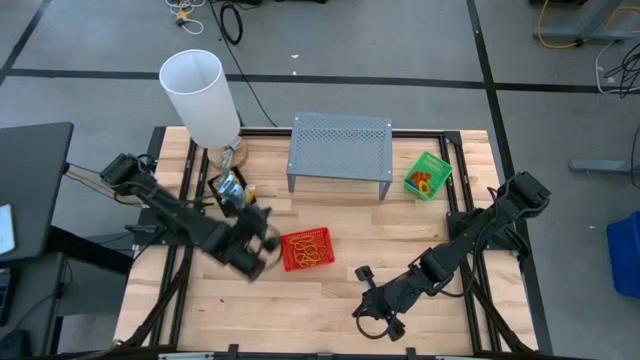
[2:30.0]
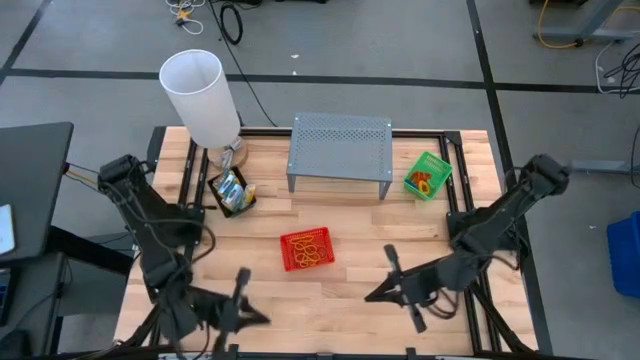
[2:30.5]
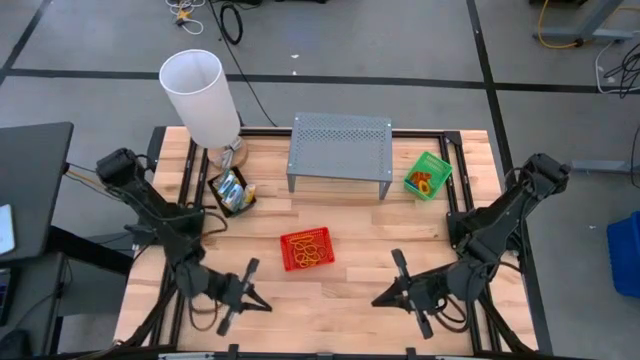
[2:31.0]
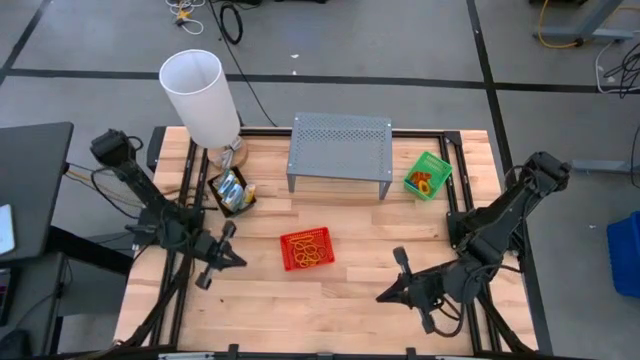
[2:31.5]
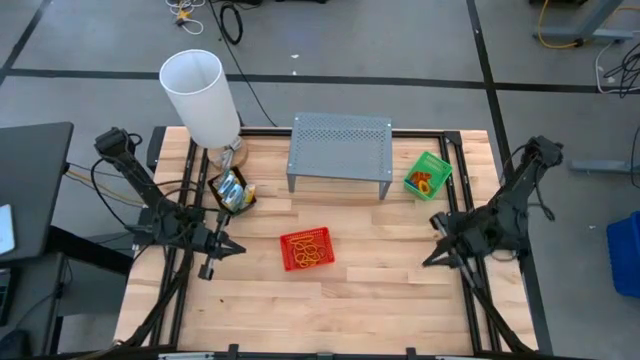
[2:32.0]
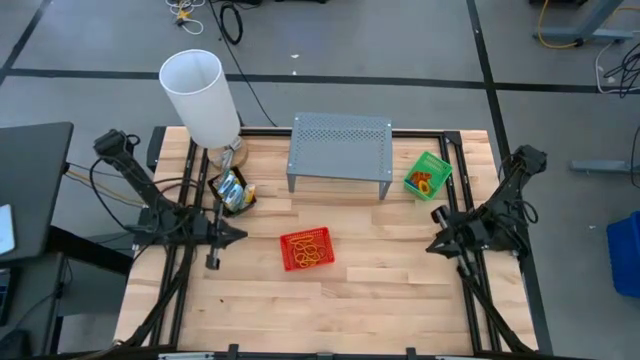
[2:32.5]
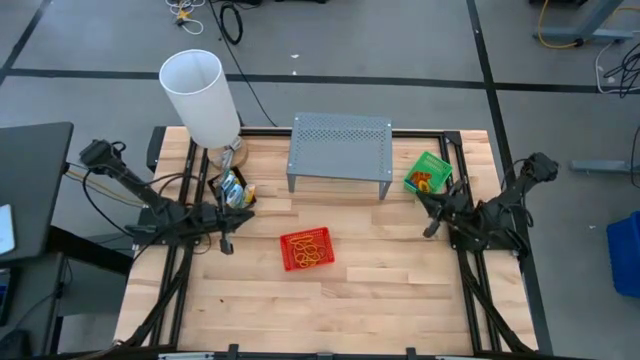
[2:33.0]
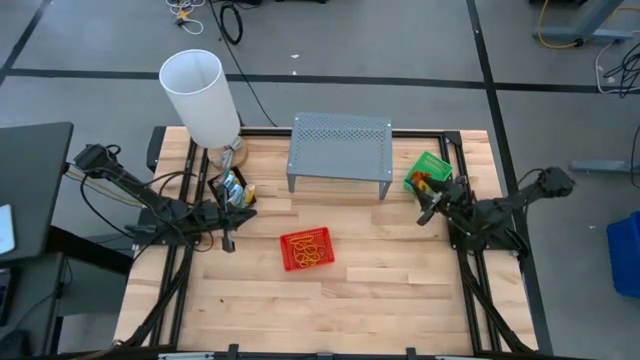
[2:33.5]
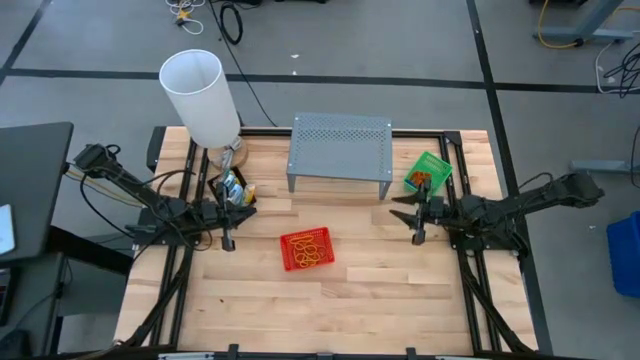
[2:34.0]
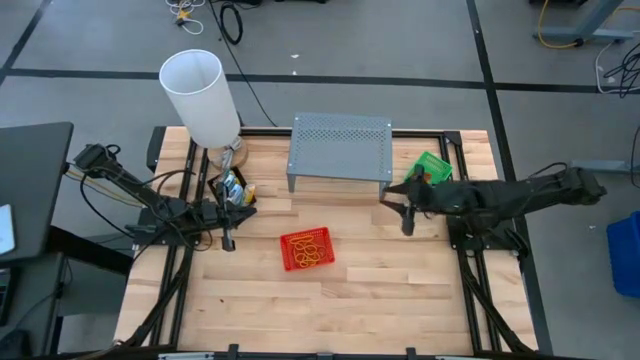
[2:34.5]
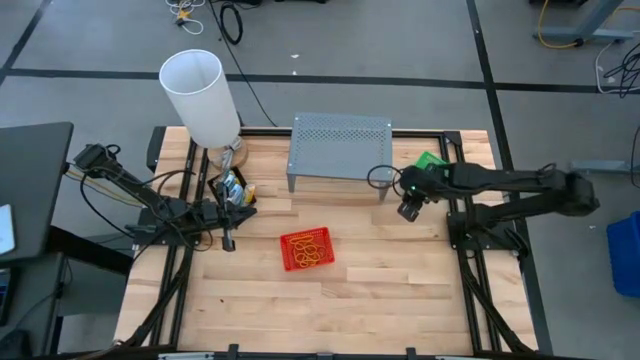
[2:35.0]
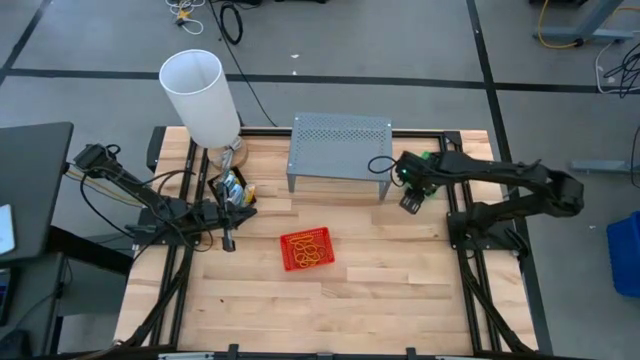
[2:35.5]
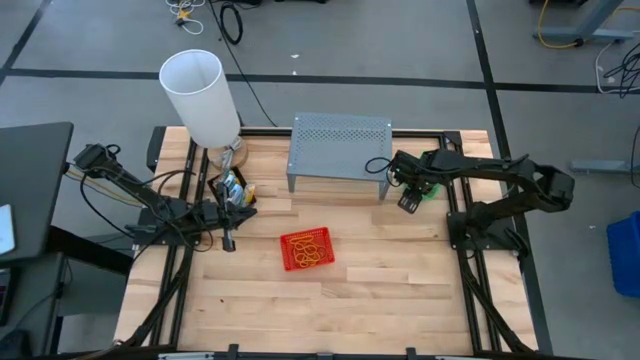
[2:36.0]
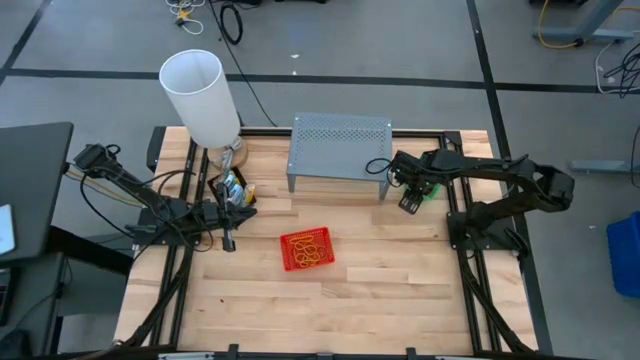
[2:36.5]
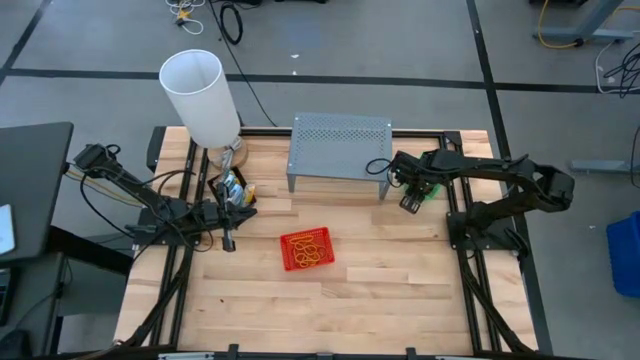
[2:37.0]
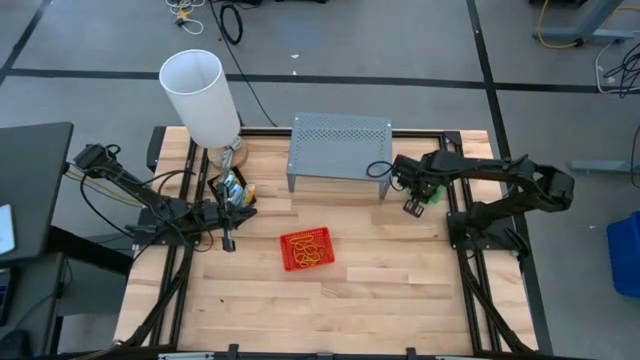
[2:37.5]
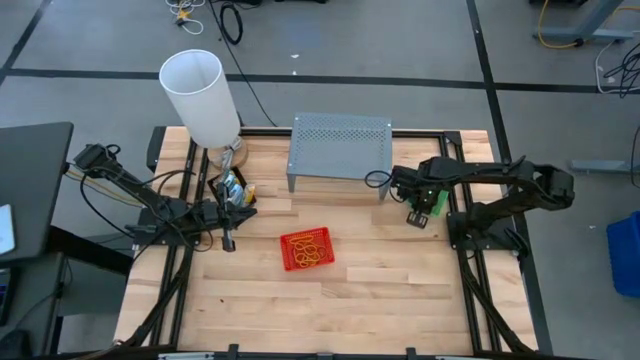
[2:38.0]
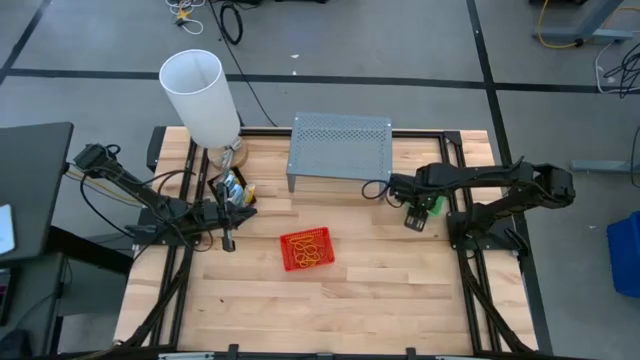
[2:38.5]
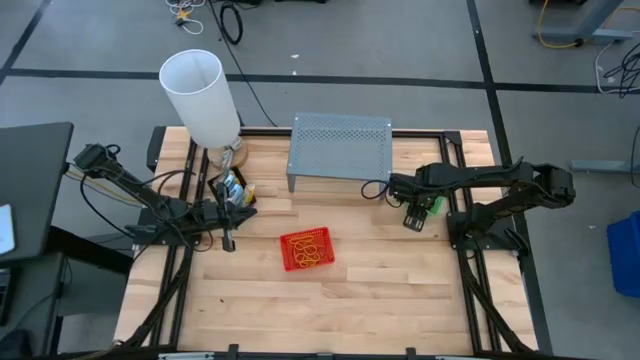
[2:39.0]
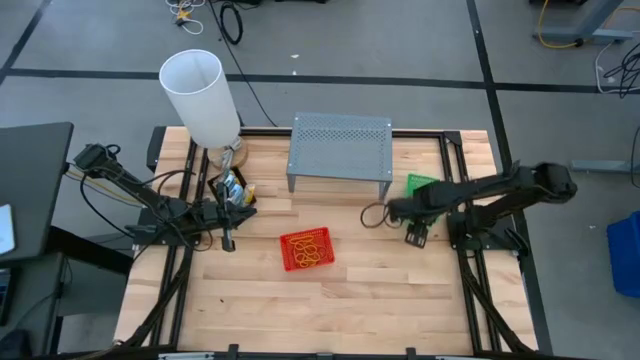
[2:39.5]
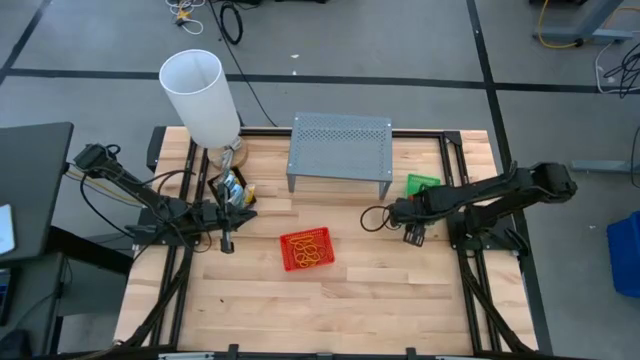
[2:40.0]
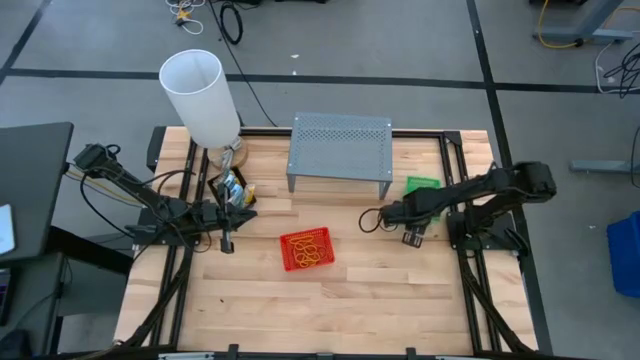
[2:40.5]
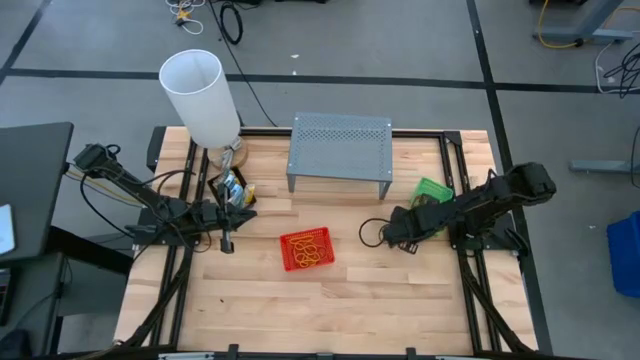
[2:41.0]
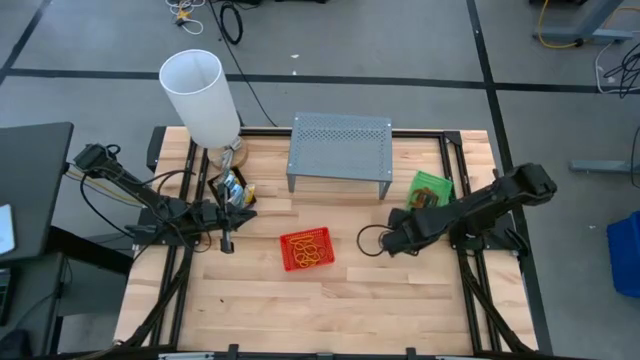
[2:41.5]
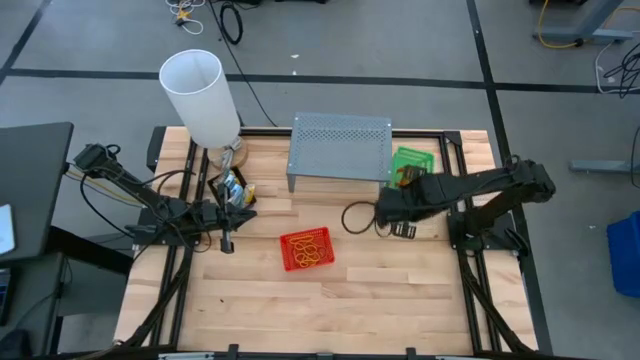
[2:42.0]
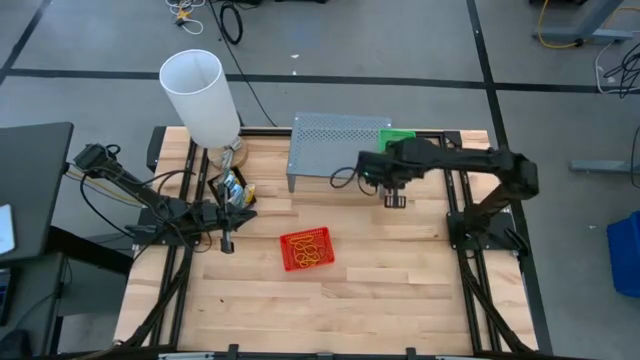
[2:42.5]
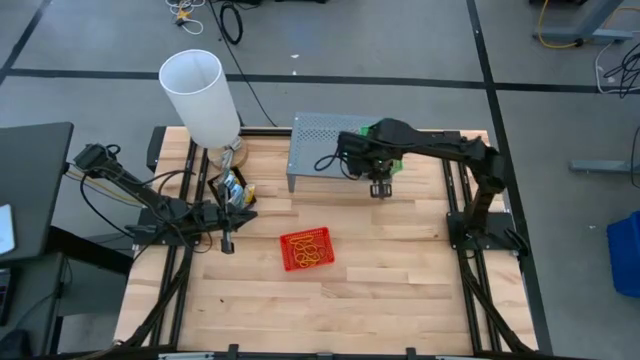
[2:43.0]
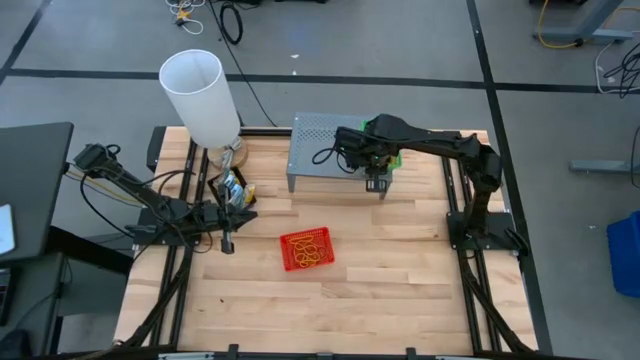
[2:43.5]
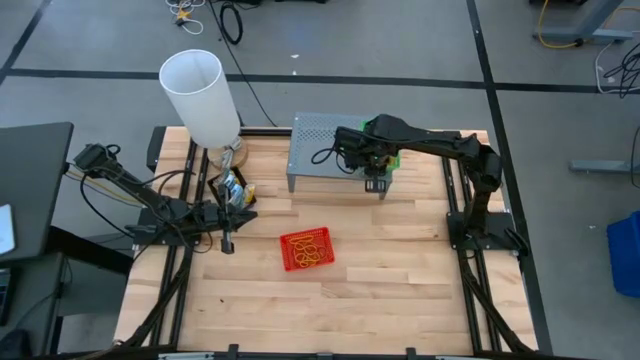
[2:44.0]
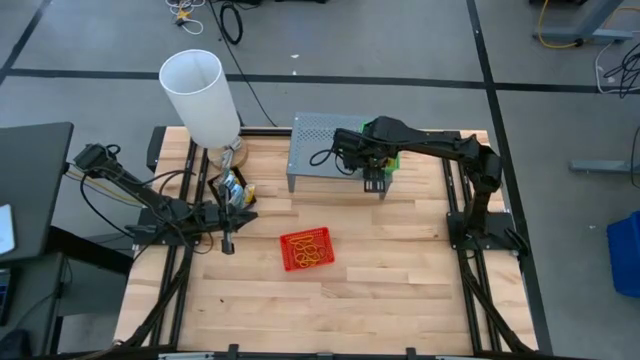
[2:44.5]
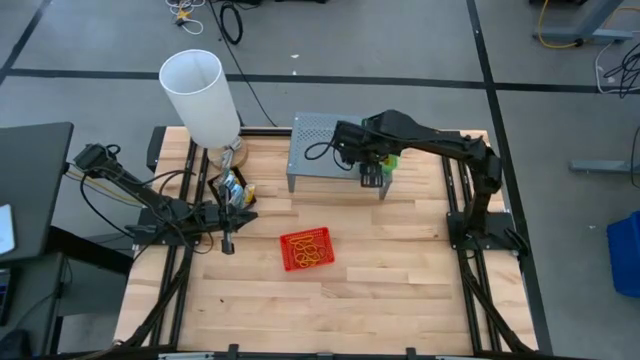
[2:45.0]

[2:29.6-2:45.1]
Task: Pick & Place Office Desk Supplies
Put the green bin on the shelf

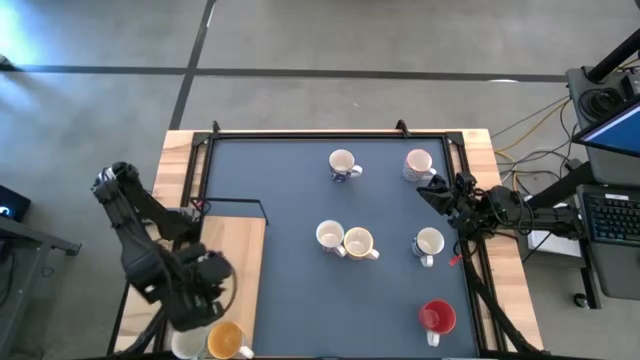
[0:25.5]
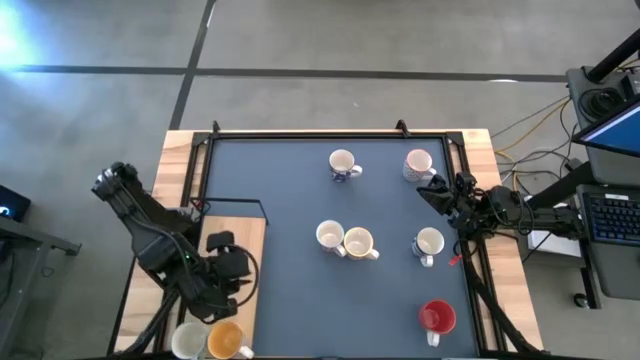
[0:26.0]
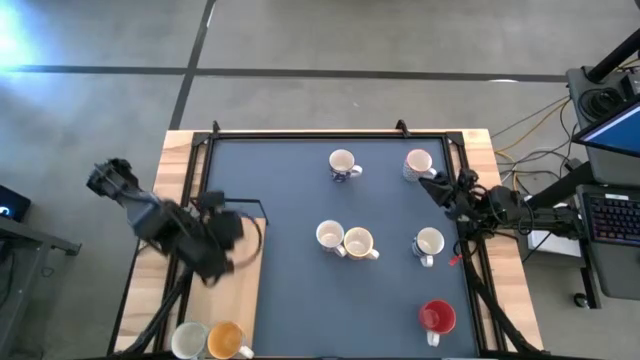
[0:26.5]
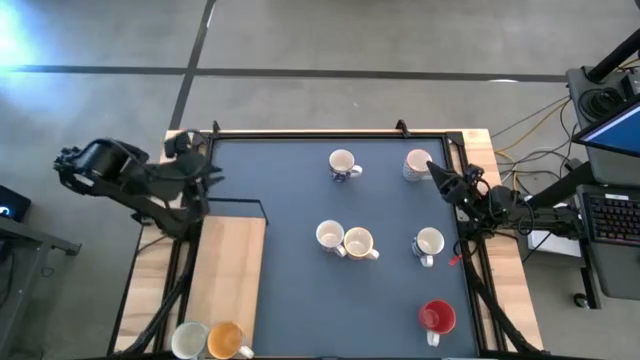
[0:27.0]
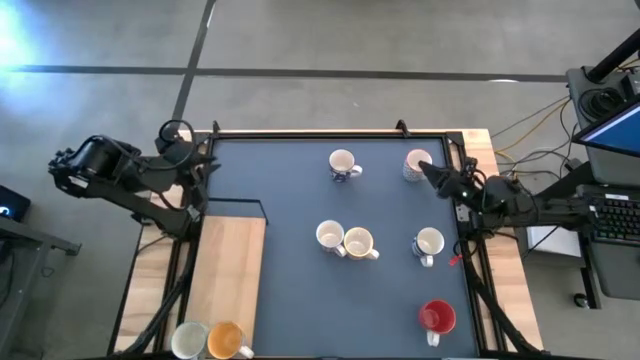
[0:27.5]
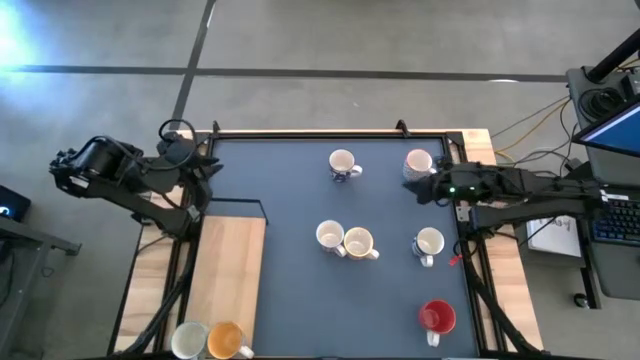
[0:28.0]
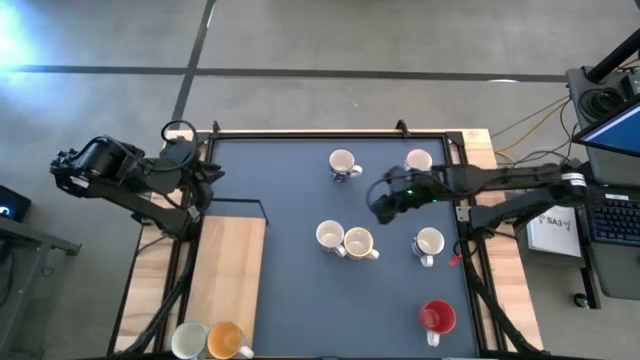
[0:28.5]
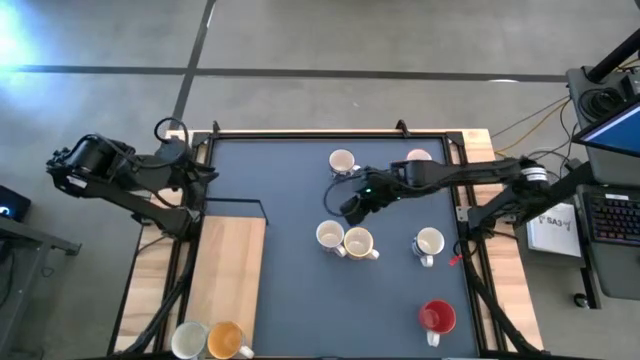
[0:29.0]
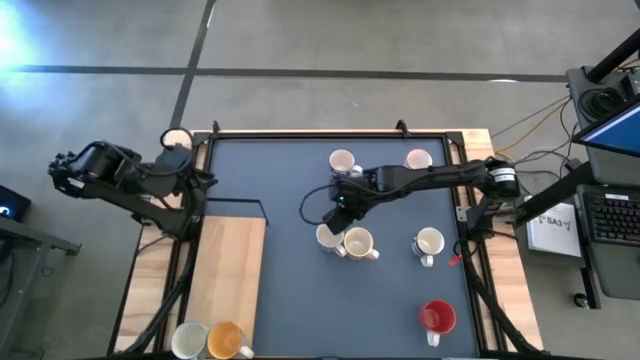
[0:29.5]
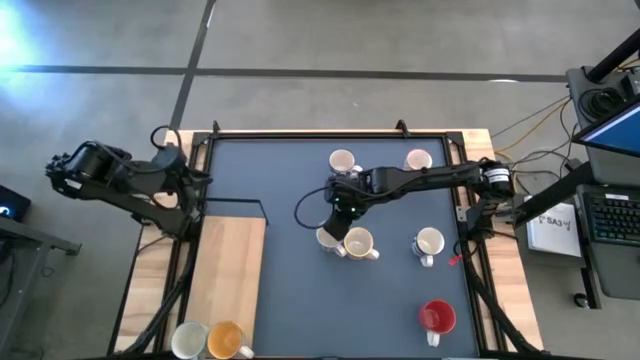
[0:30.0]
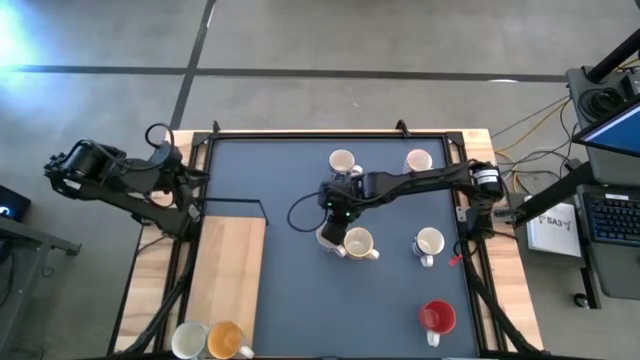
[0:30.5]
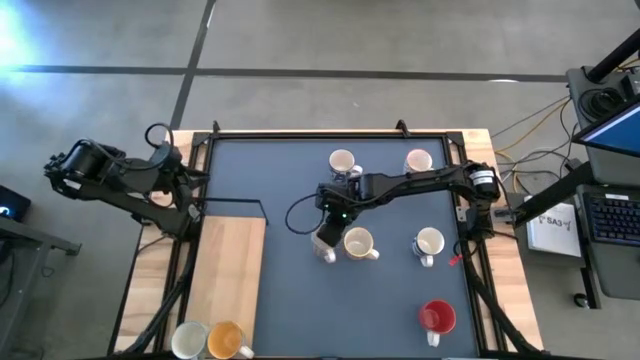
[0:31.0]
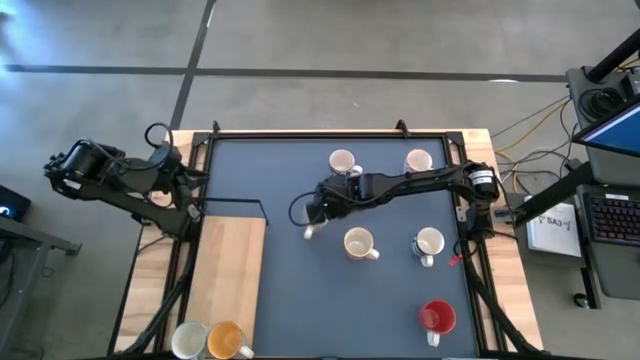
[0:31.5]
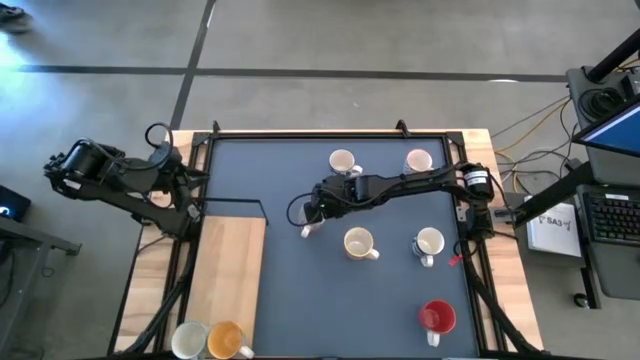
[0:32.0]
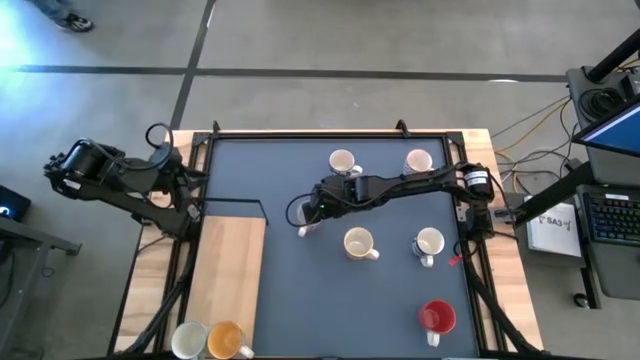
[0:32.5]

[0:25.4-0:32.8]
Task: Place coffee mugs
Adjust the patterned red mug
